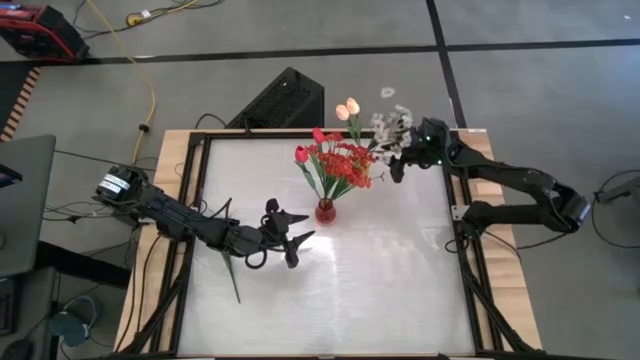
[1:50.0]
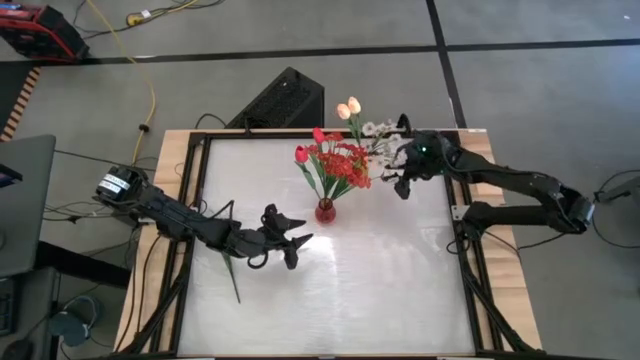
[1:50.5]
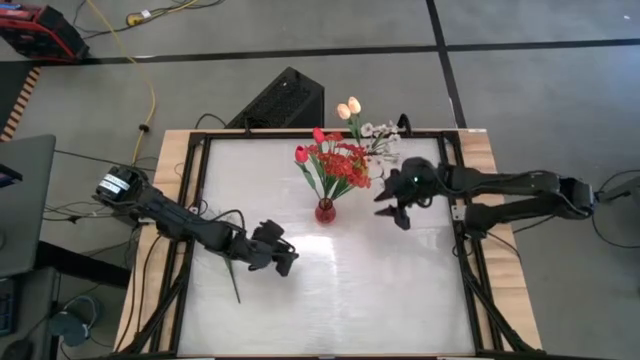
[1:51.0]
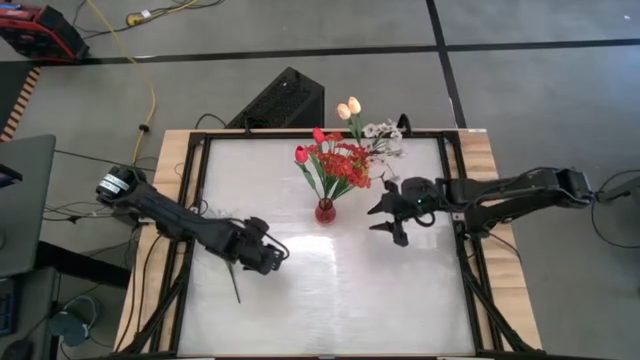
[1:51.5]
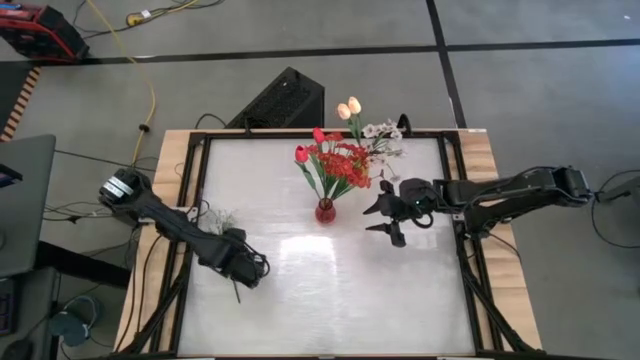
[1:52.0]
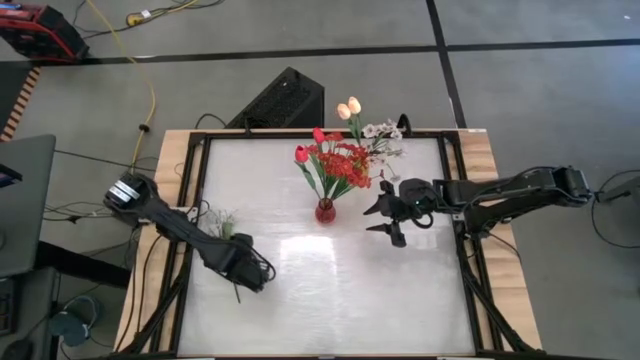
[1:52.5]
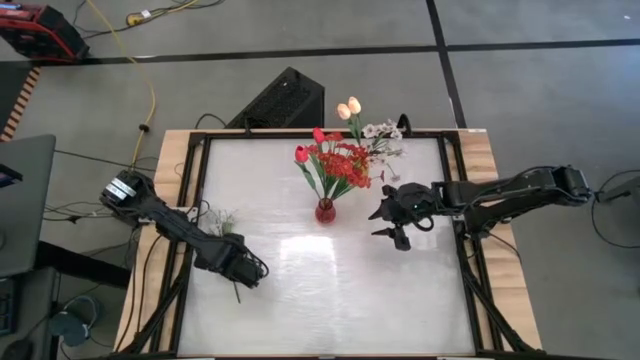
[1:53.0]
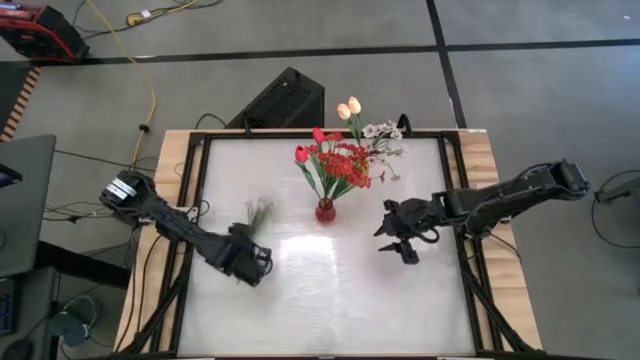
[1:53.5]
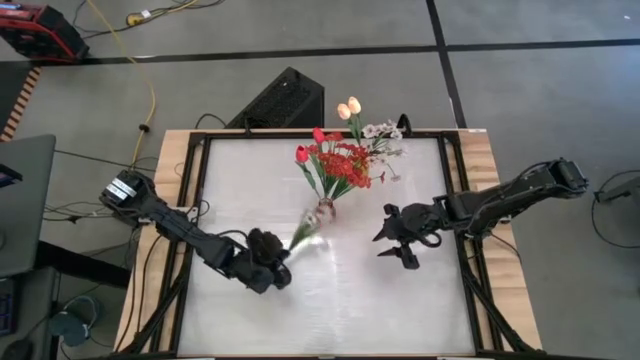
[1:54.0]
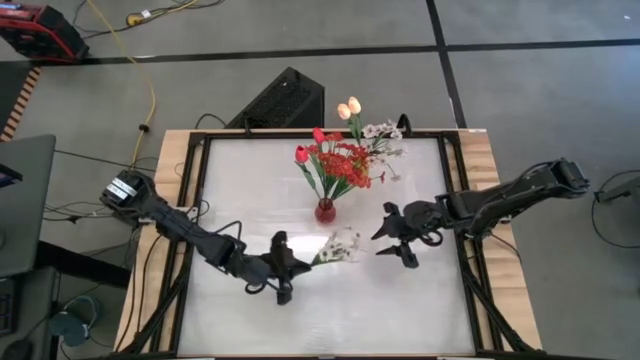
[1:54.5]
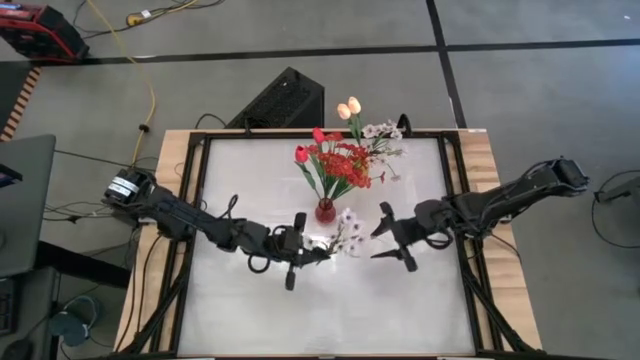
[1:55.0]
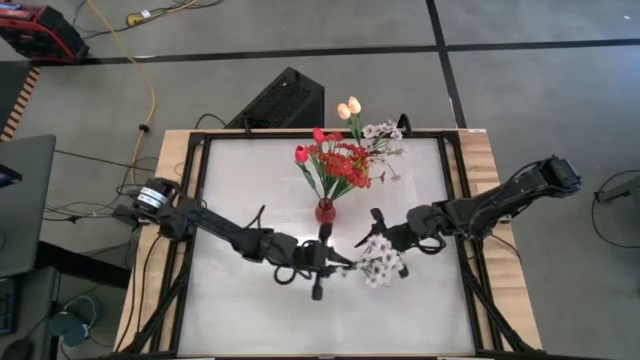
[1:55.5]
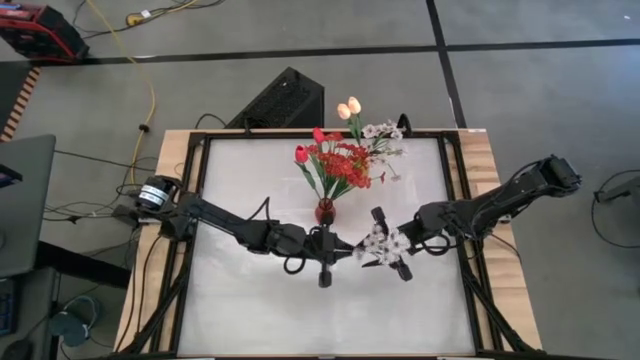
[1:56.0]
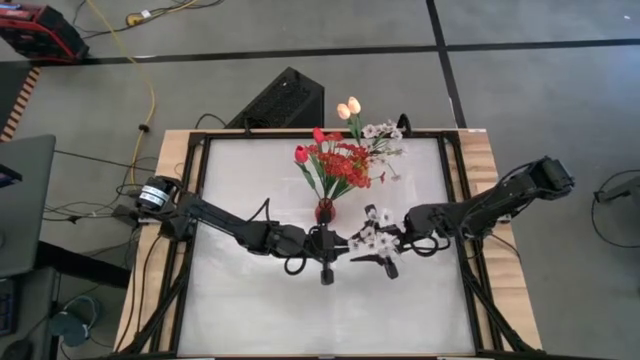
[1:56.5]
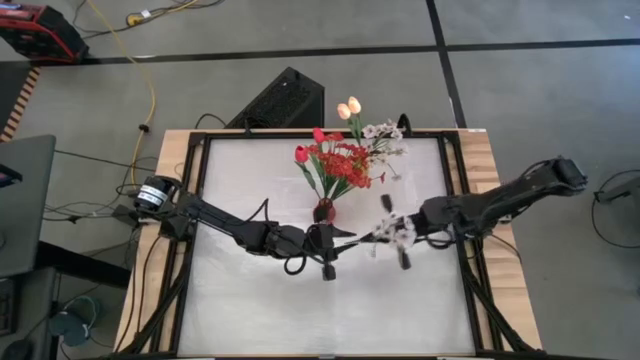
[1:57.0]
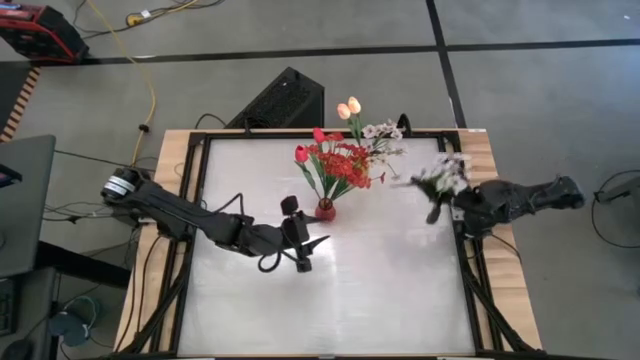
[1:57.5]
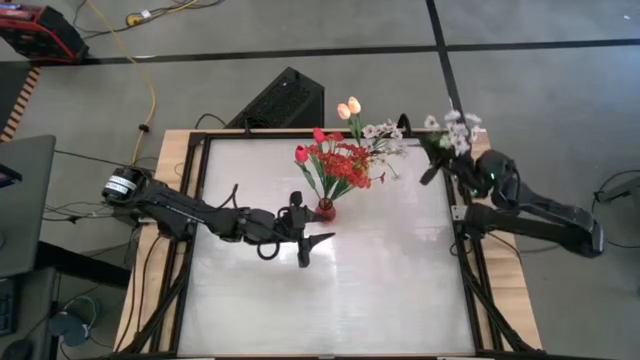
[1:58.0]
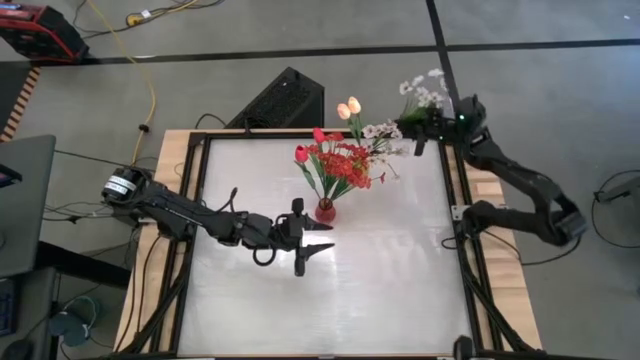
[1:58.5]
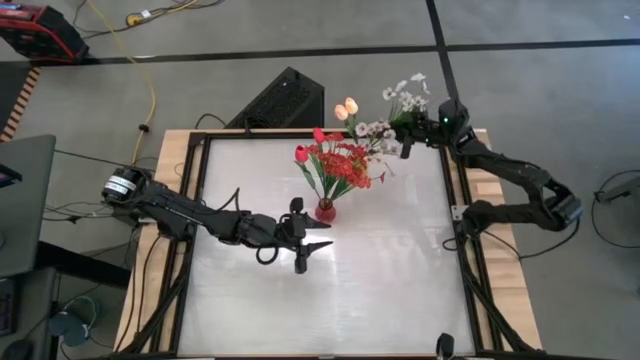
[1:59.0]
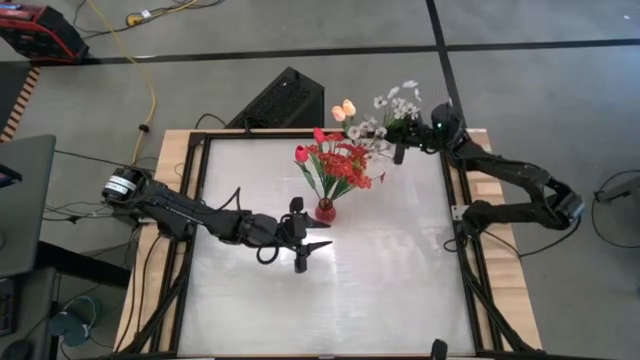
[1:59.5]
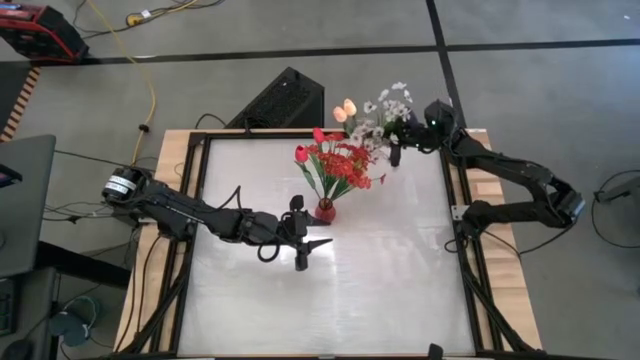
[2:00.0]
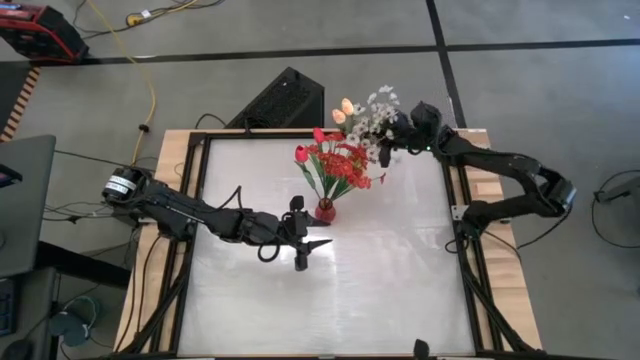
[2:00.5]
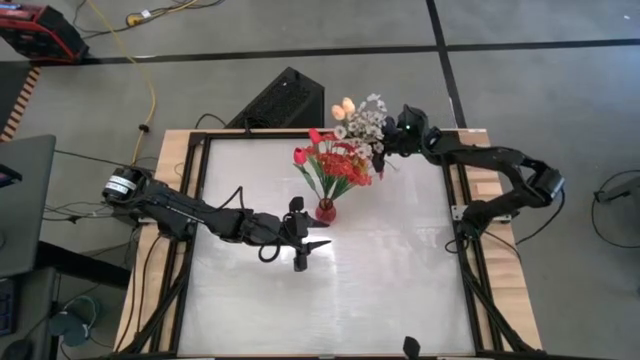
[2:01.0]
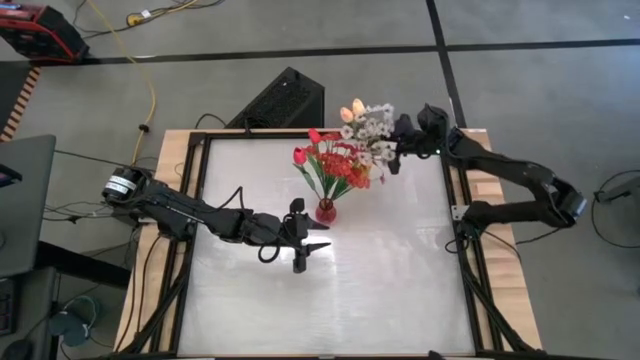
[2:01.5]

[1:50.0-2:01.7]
Task: Sort flowers into vase by color
Put the white flowers into the yellow vase

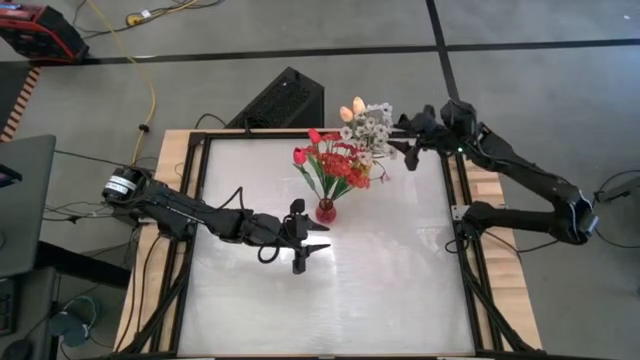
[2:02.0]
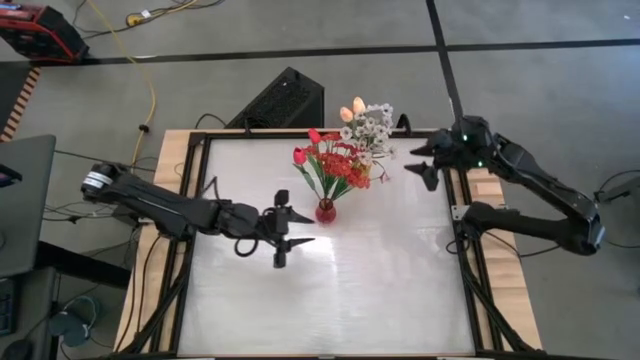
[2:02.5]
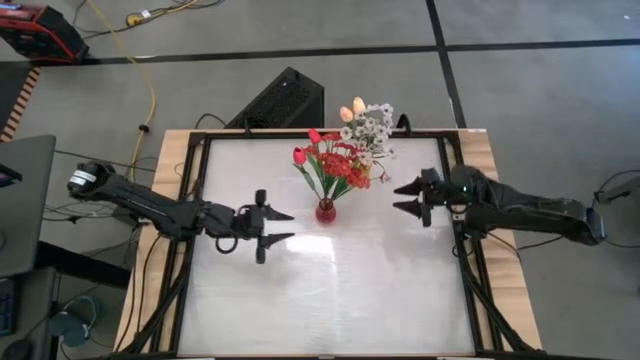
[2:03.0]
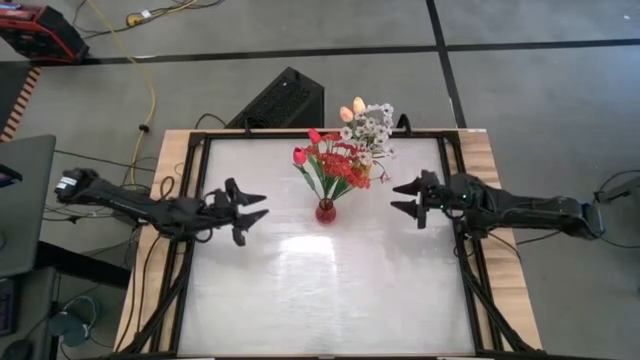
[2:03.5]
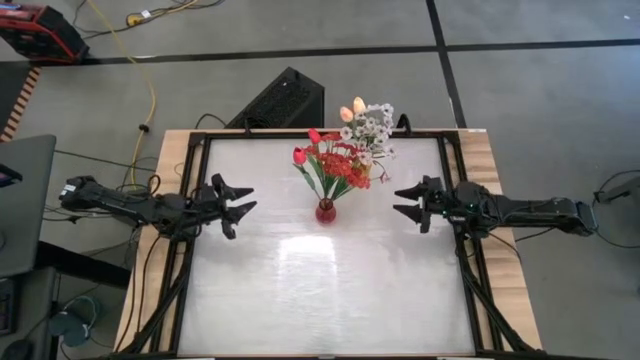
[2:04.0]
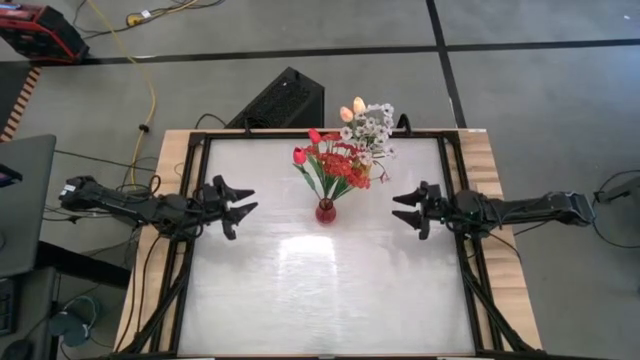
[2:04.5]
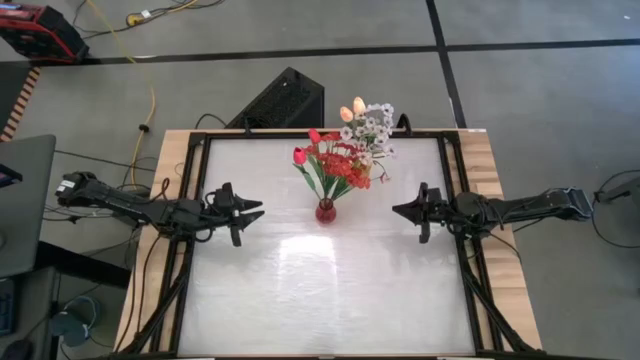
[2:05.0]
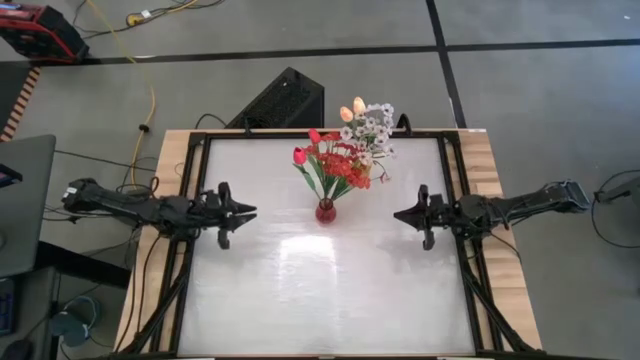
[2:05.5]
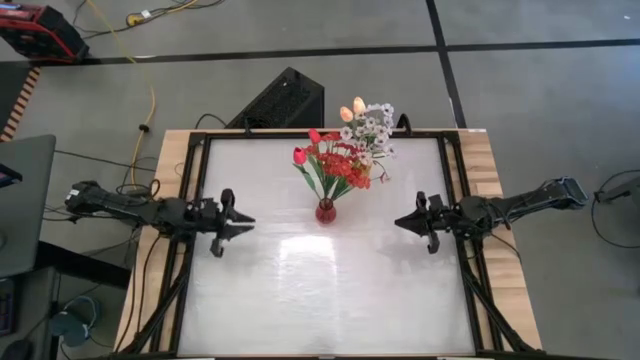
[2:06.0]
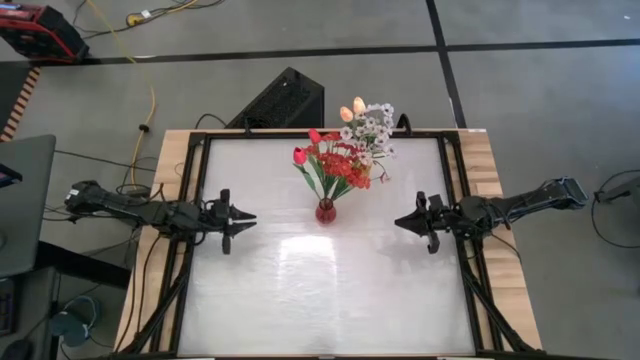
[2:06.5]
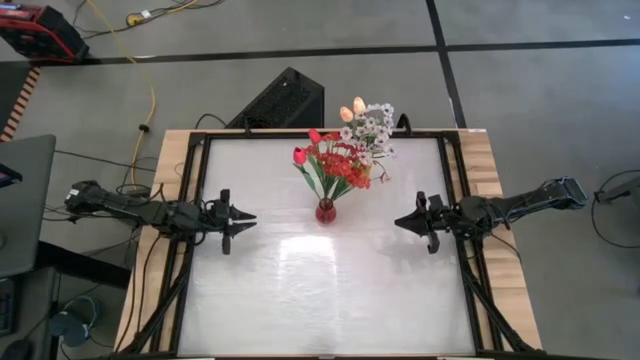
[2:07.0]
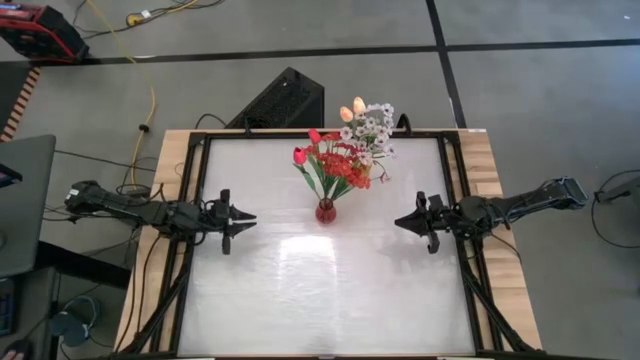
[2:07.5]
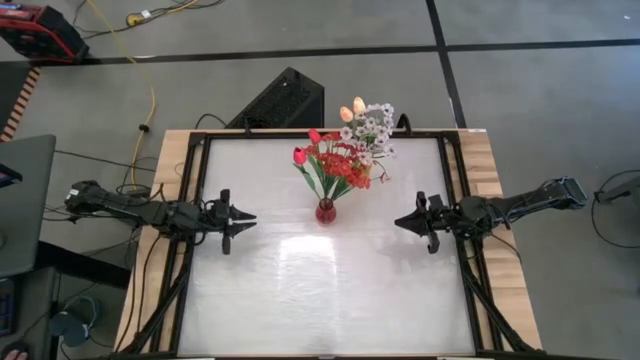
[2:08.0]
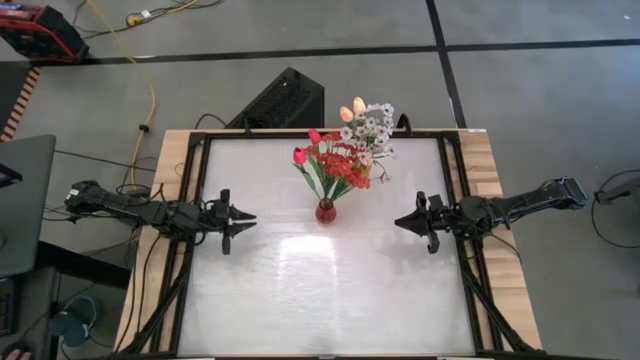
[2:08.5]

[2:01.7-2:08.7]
Return to Home Position

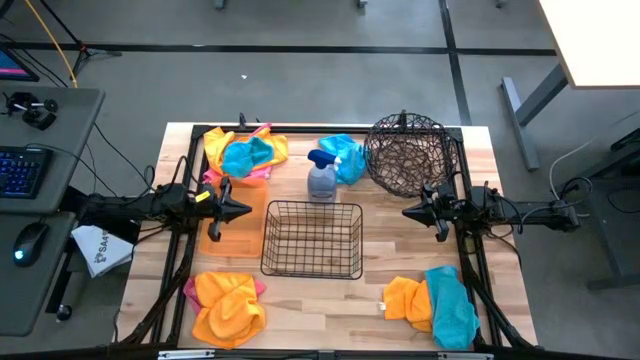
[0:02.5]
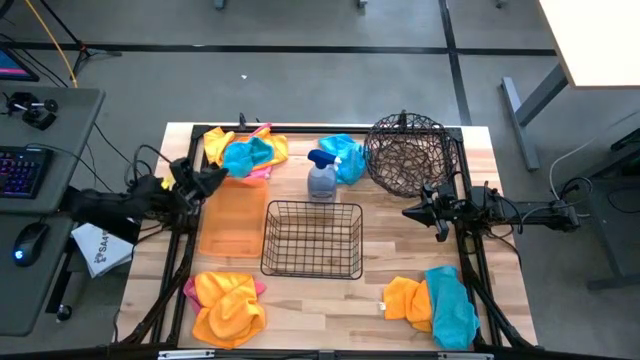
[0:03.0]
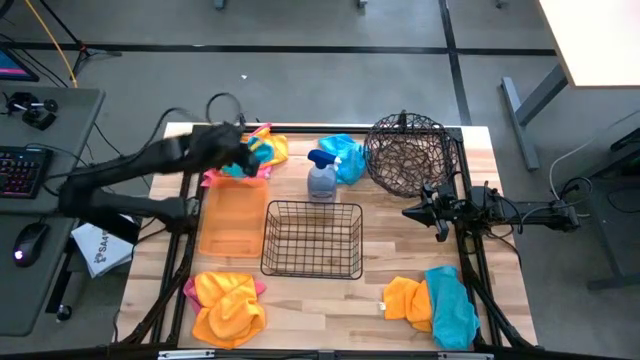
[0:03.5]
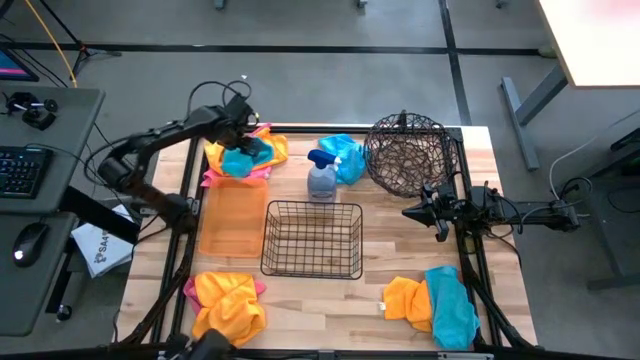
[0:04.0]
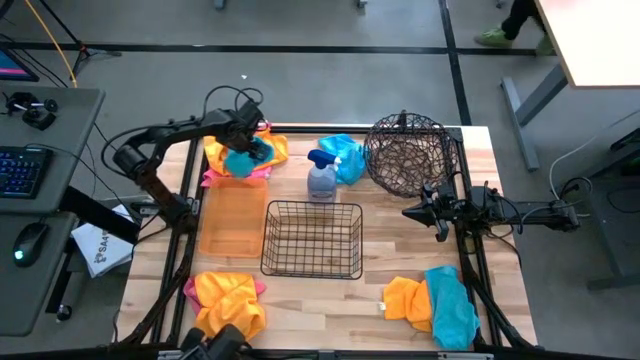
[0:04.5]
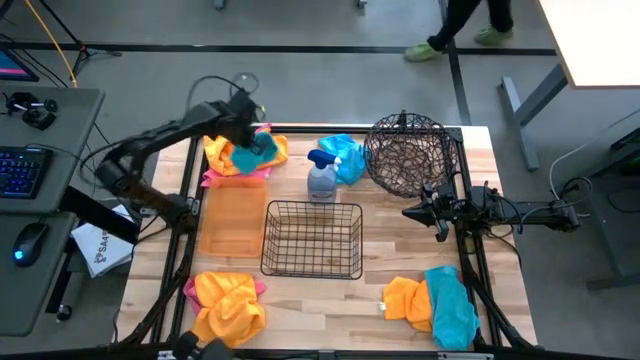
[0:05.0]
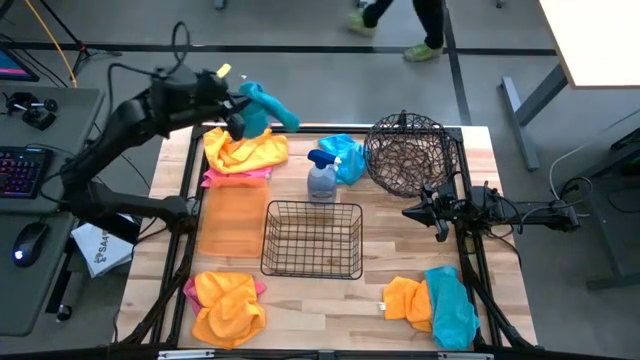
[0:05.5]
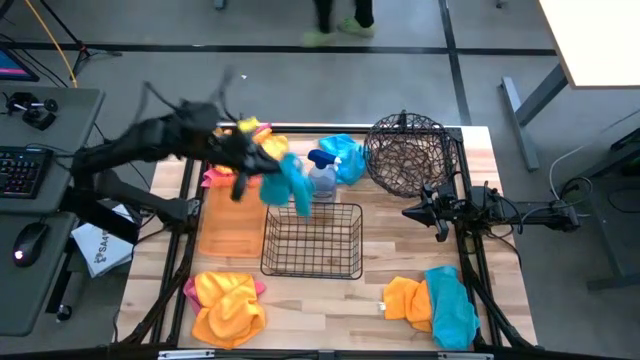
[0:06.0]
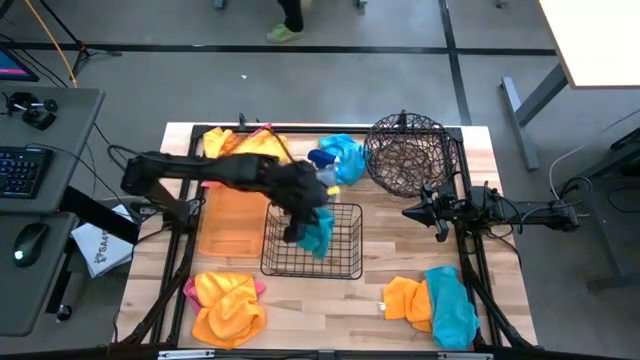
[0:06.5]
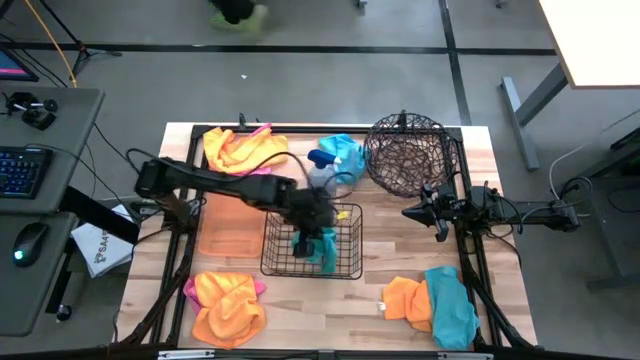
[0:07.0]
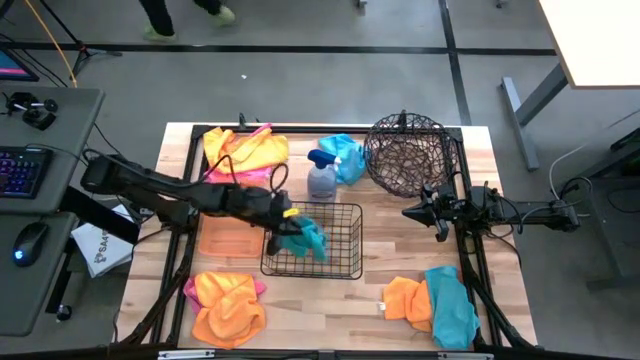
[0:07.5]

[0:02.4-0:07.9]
Task: Sort microfiber towel by color & place in baskets
Put the top left blue towel into the bottom wire basket
